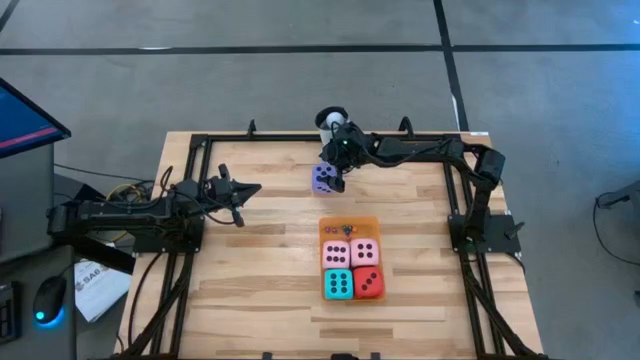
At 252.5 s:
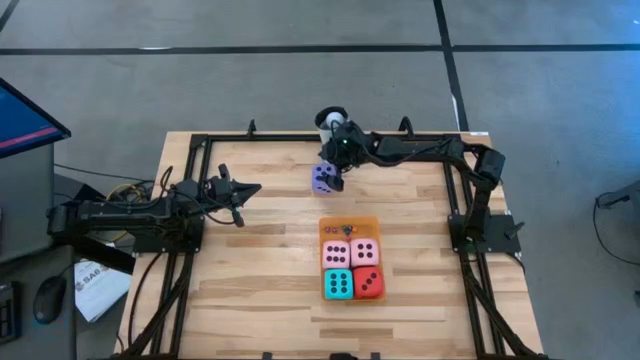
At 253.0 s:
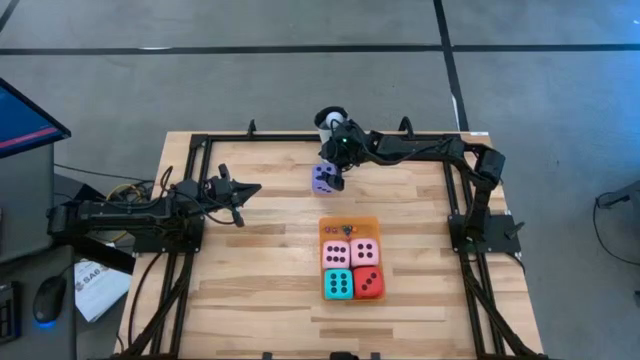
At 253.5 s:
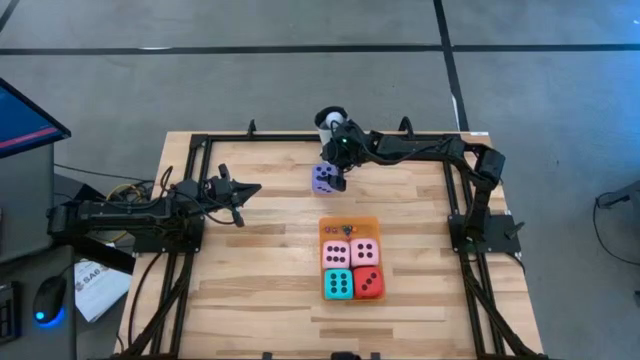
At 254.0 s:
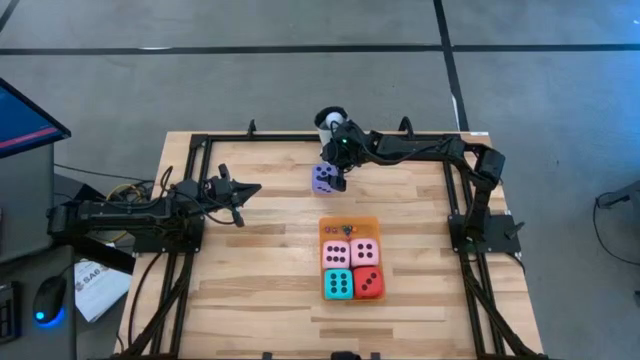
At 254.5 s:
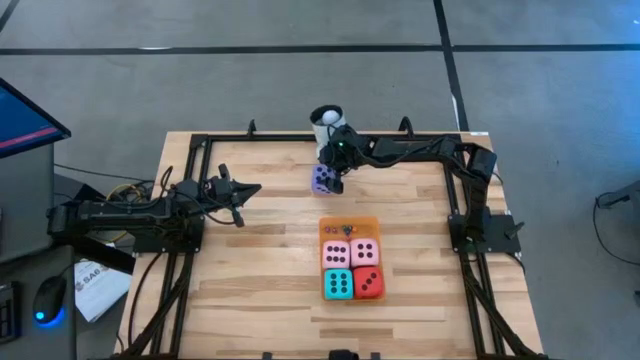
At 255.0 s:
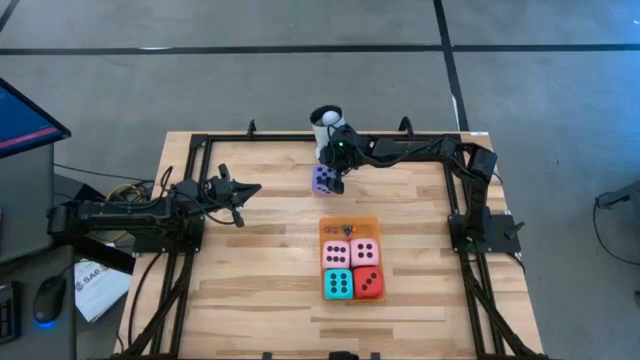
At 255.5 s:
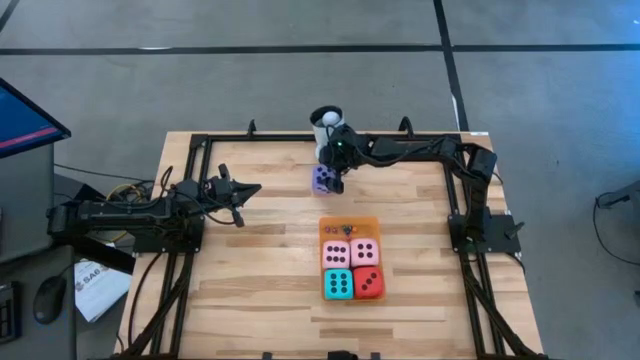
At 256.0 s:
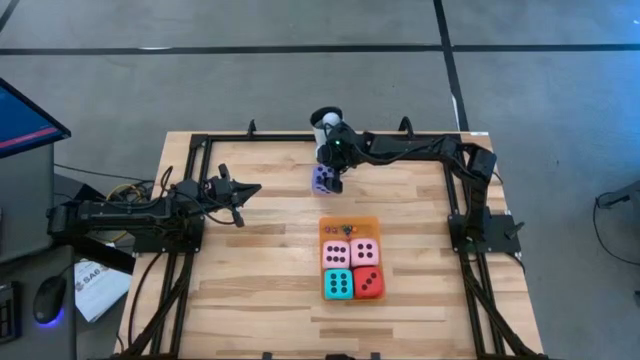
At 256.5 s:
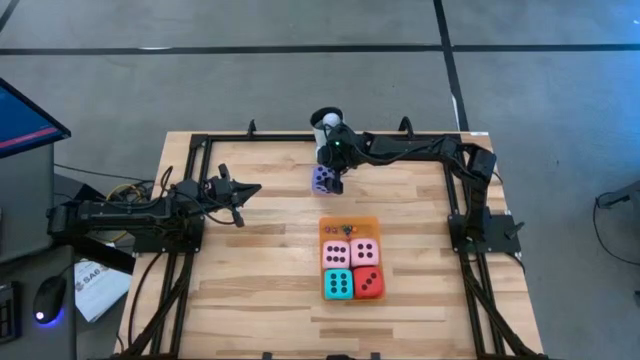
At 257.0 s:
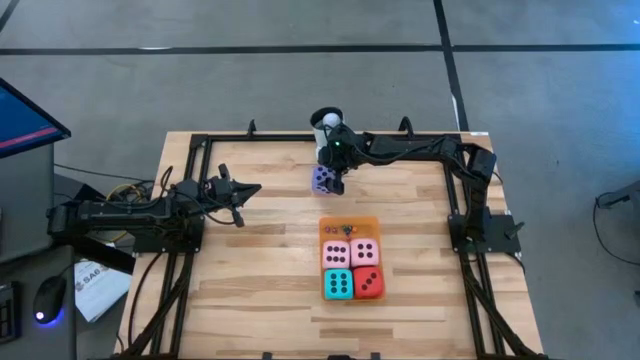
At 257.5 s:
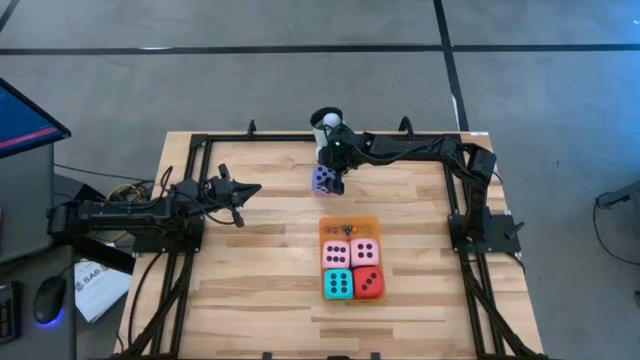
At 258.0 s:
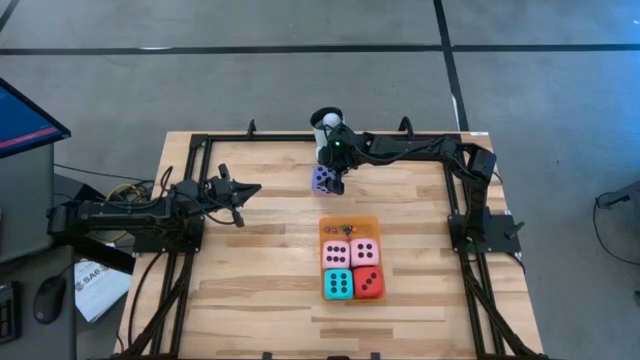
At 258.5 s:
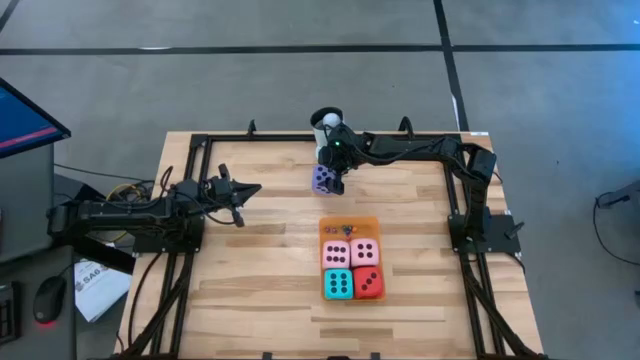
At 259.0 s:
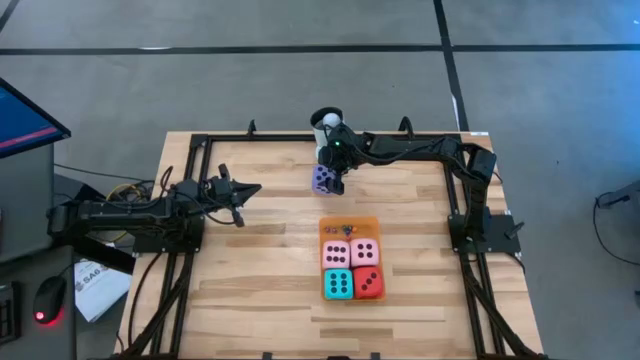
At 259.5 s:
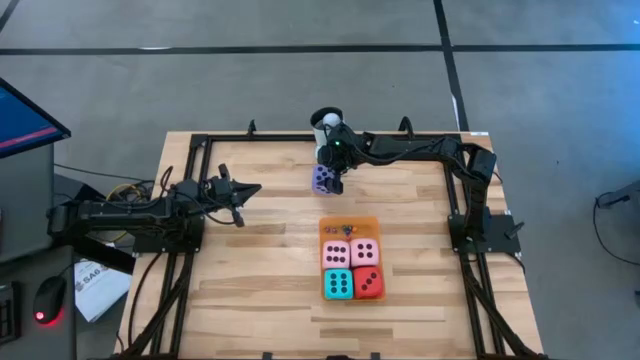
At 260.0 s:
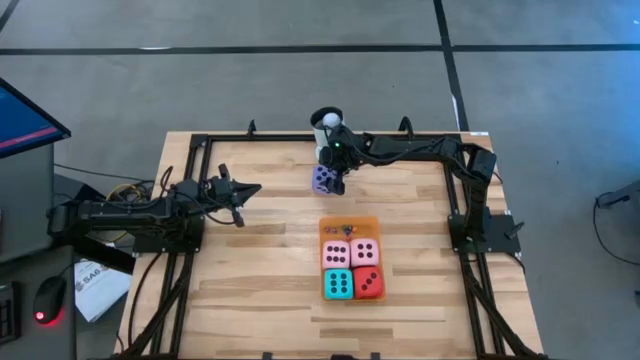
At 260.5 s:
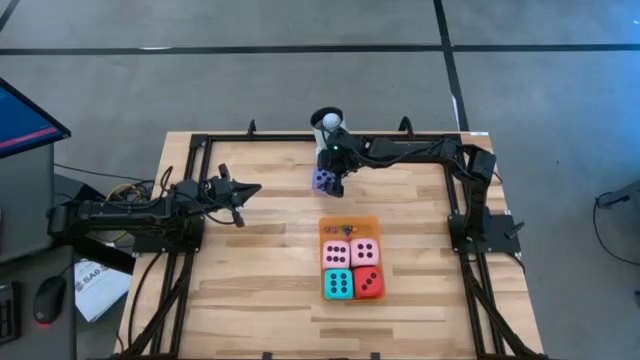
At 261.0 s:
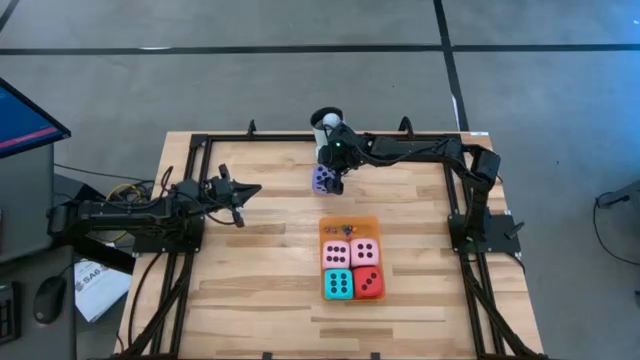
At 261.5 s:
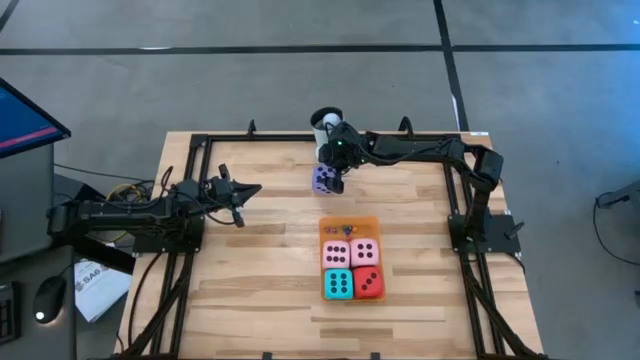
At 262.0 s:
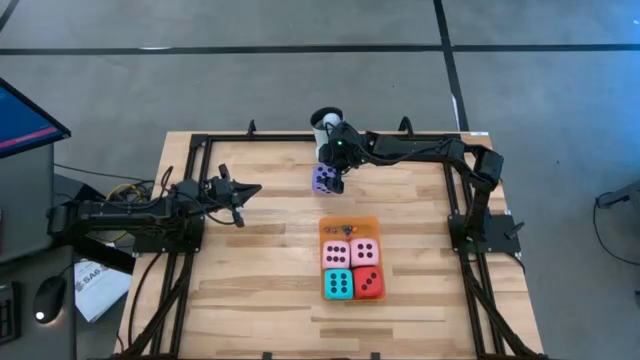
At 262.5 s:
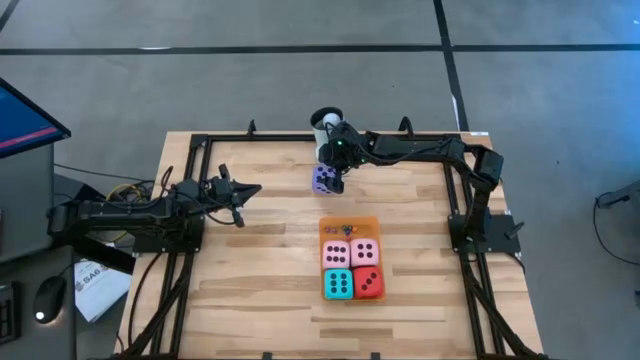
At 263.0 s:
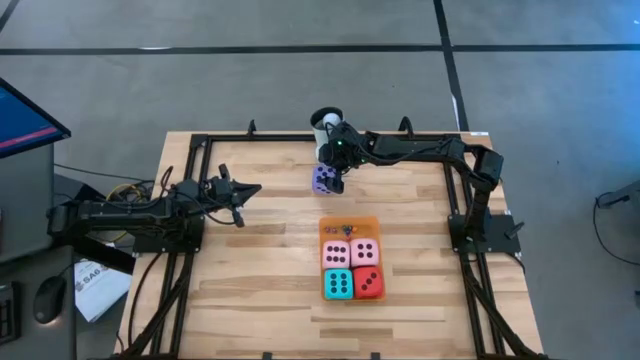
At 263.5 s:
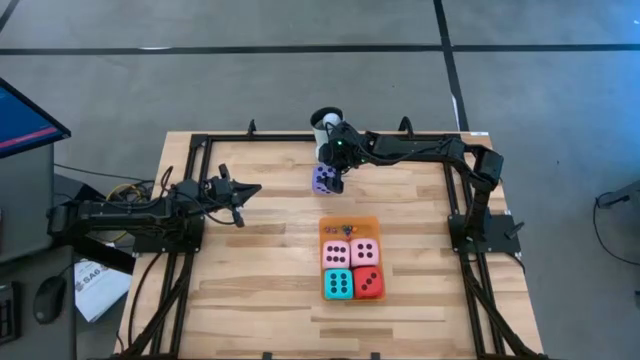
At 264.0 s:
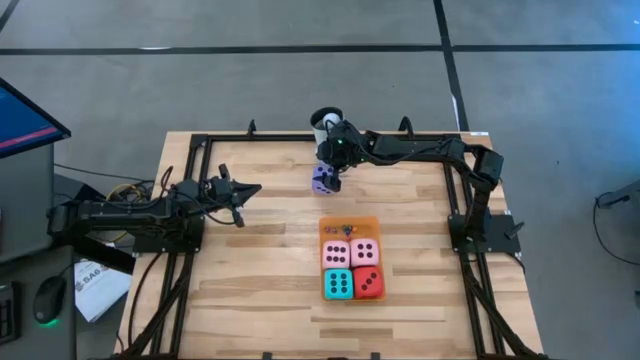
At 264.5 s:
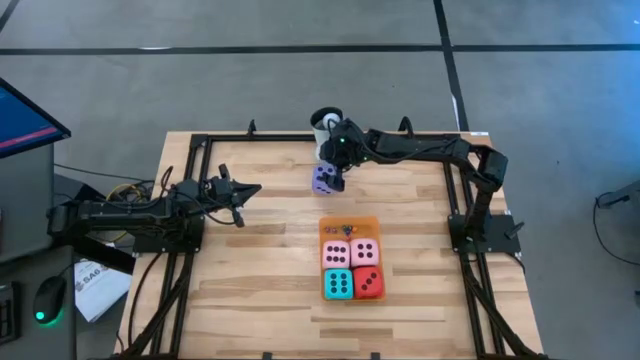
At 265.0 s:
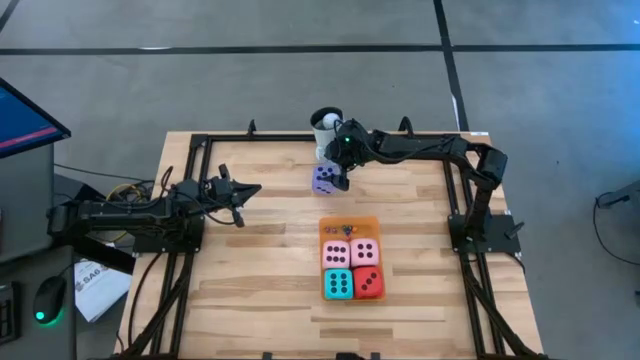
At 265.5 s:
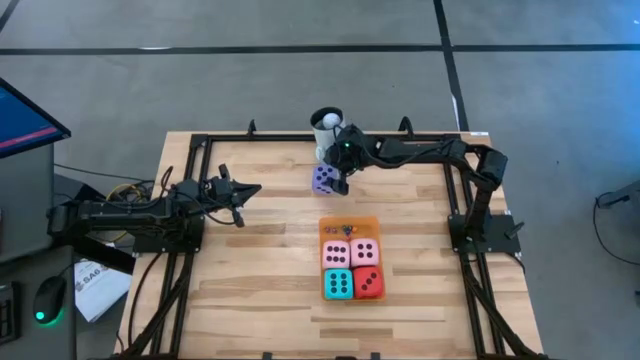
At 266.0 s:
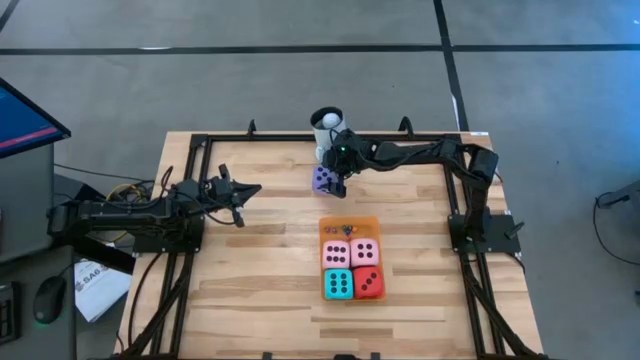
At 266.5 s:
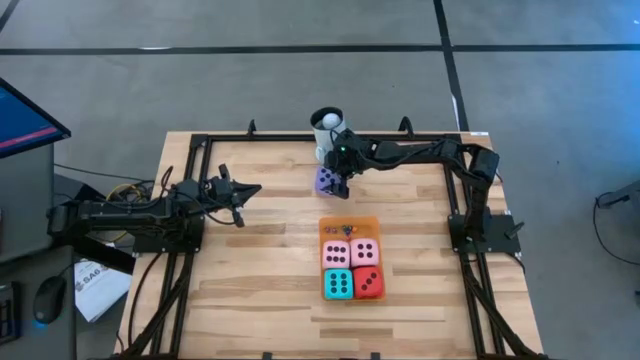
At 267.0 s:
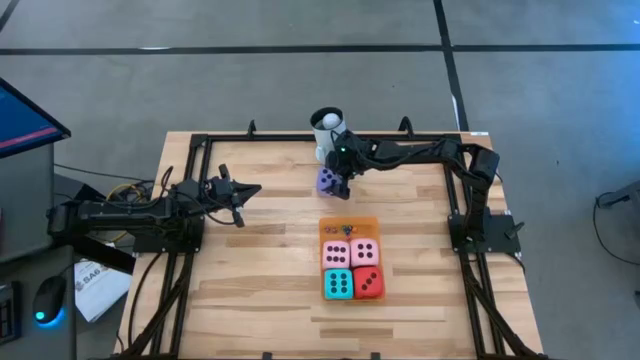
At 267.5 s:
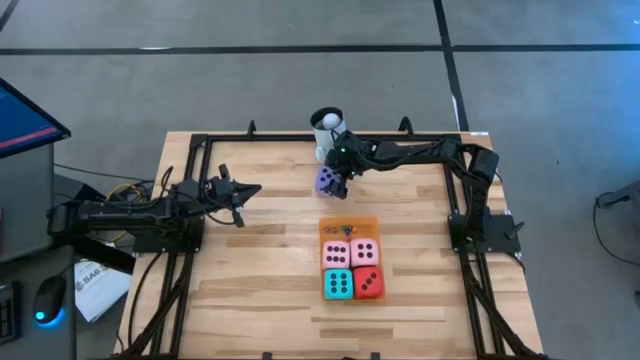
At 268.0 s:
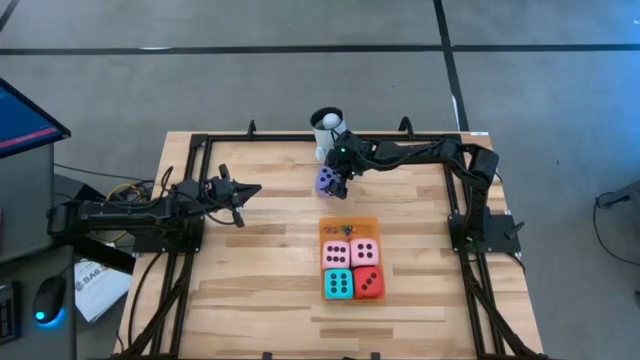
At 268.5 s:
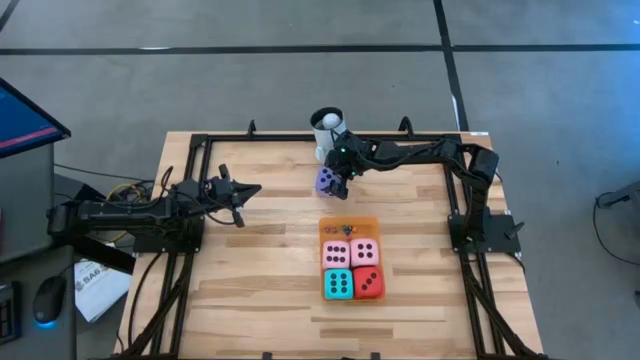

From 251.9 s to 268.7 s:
Task: Pick & Place Dice
Put the large purple dice into the orange bin

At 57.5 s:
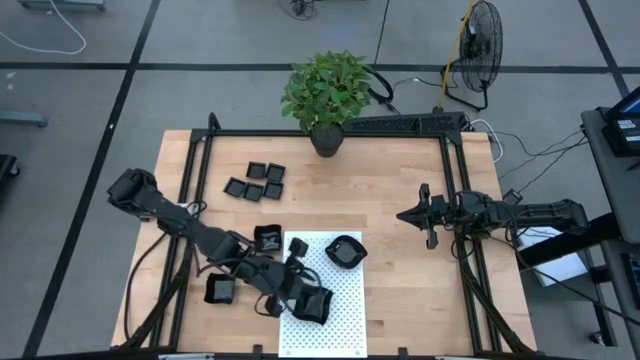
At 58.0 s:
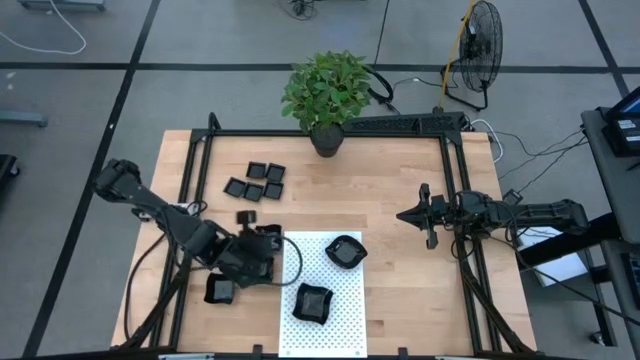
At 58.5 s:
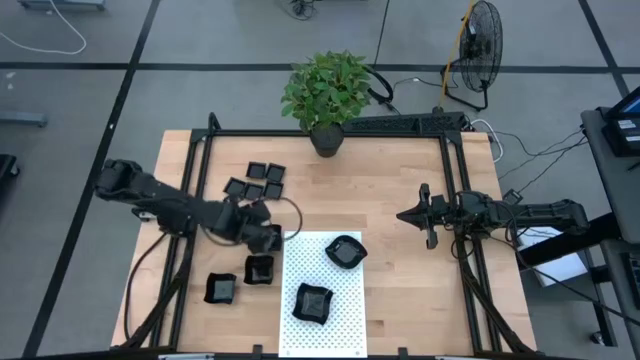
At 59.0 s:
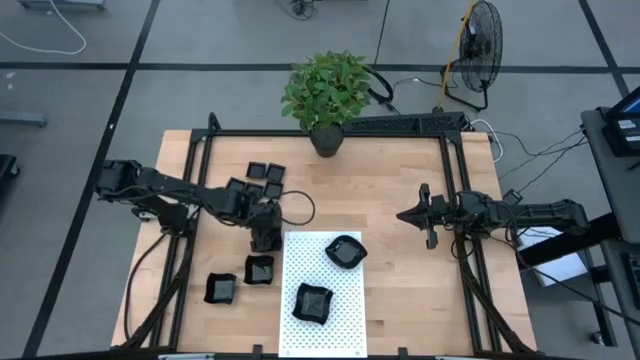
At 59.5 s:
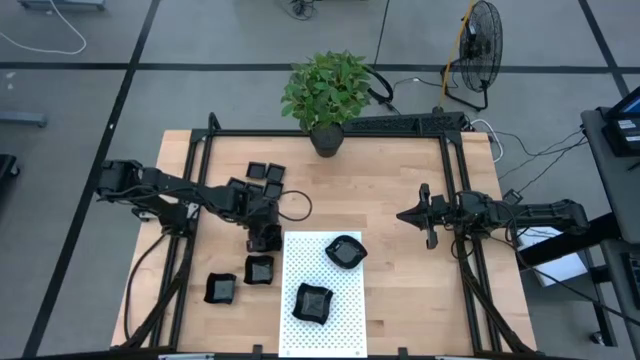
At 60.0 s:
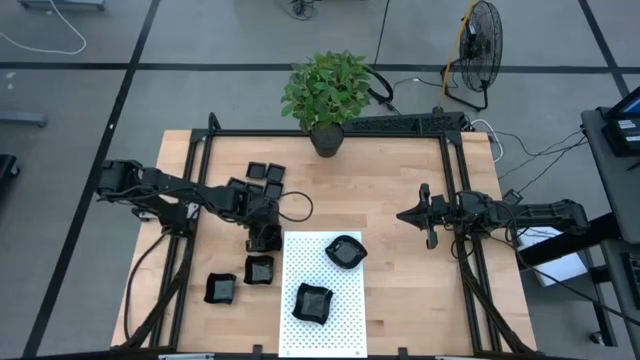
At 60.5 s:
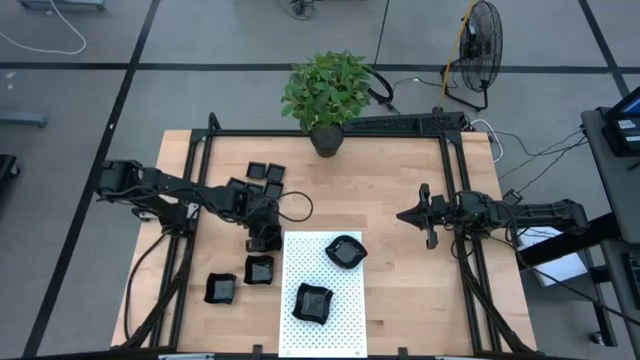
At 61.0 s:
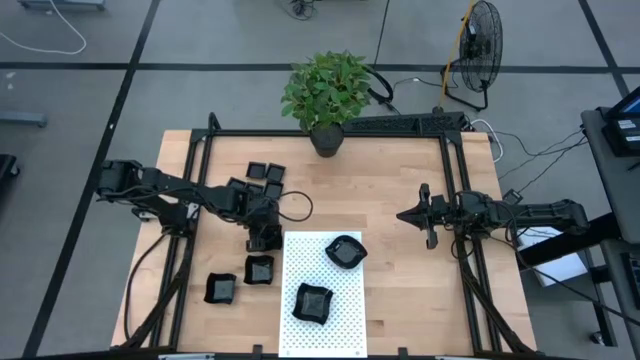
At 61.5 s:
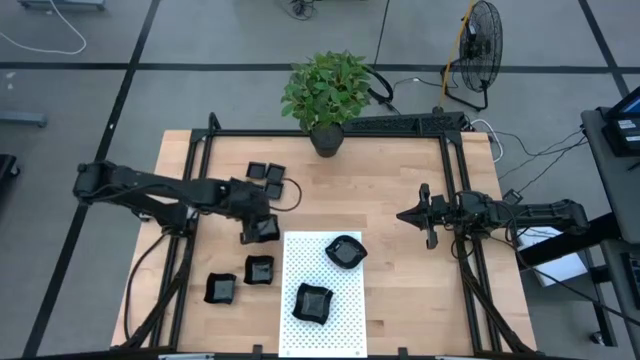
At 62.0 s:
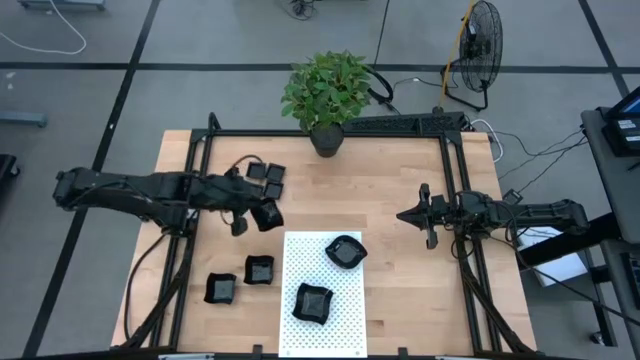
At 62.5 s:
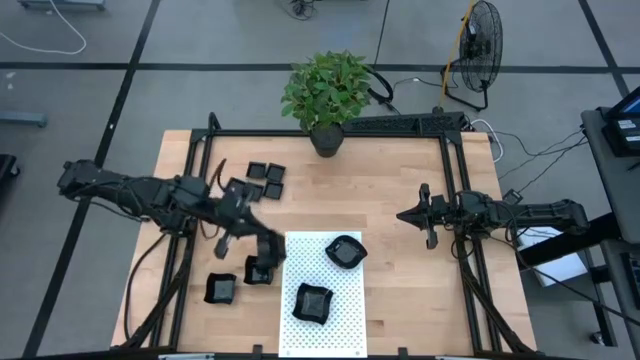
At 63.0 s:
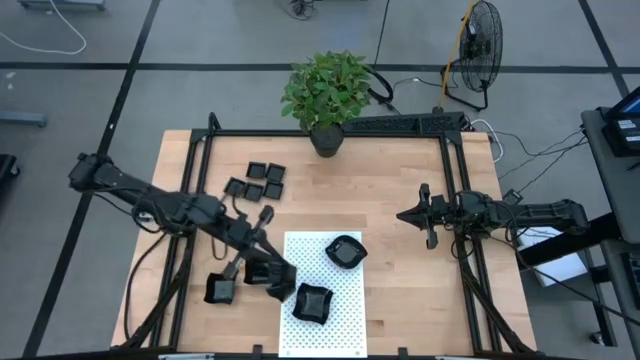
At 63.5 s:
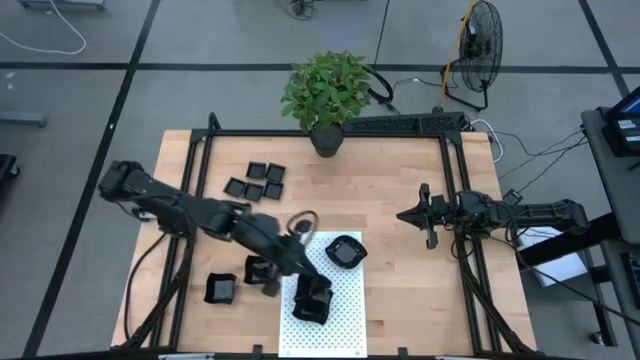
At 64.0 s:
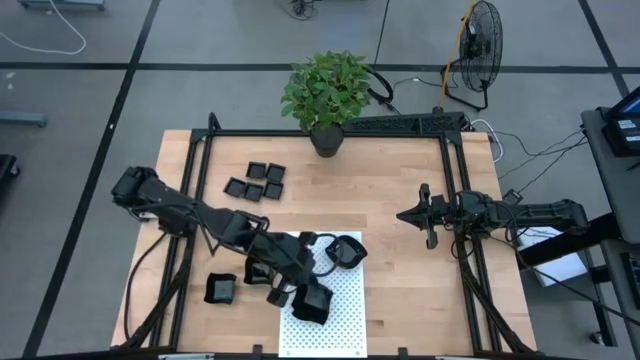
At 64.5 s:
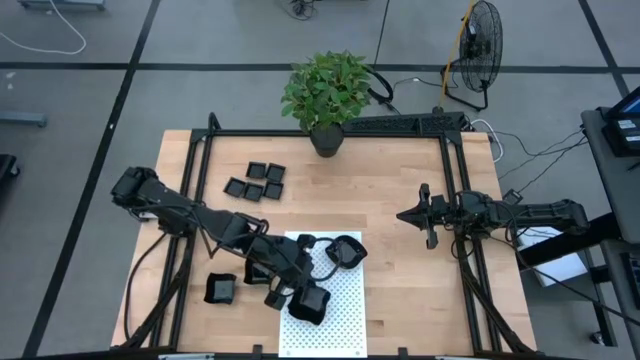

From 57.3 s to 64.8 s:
Task: Pick & Place Mini shaped plates
Stack the top distorted square plate on top of the distorted square plate on the shelf
